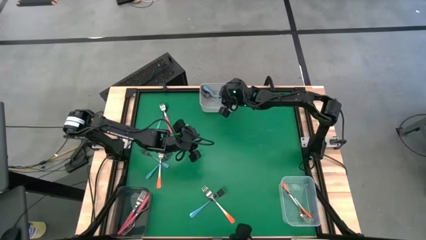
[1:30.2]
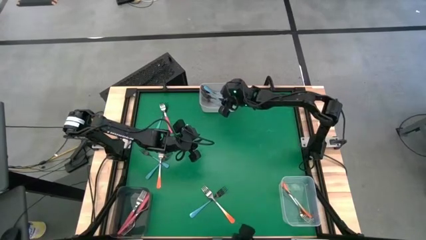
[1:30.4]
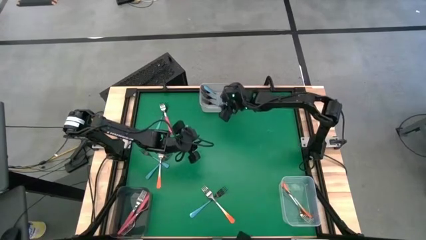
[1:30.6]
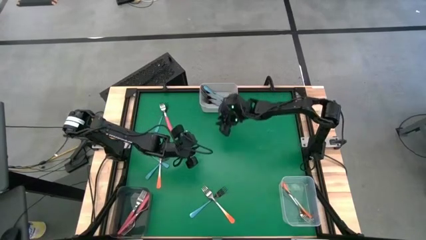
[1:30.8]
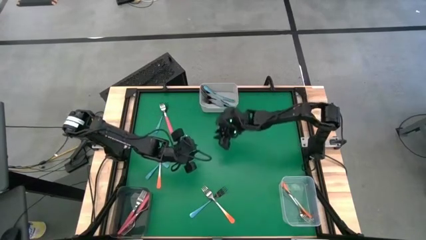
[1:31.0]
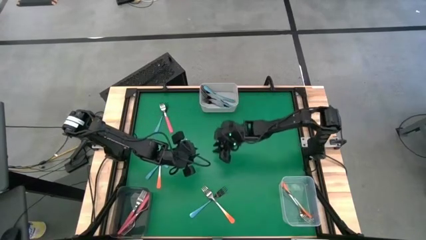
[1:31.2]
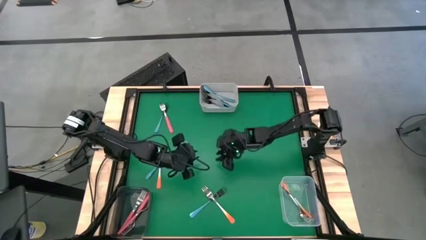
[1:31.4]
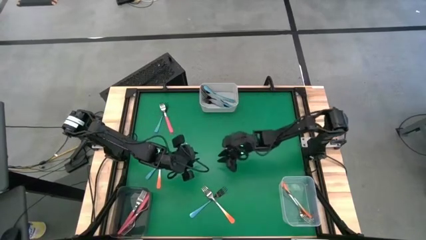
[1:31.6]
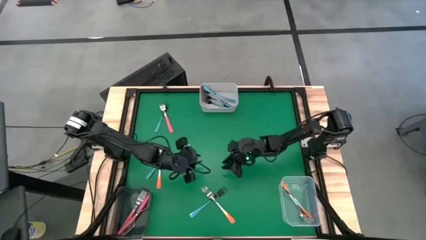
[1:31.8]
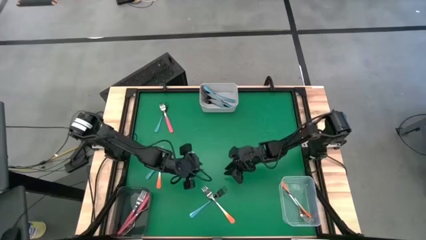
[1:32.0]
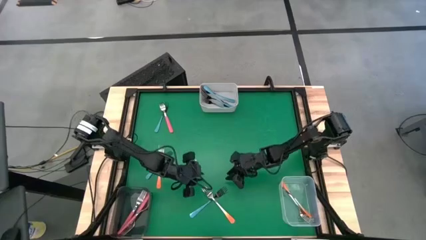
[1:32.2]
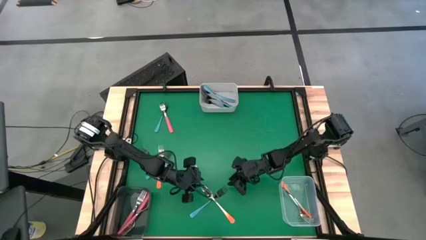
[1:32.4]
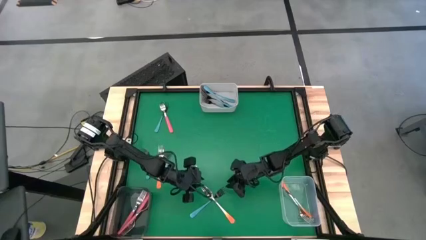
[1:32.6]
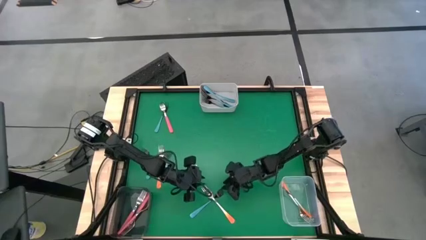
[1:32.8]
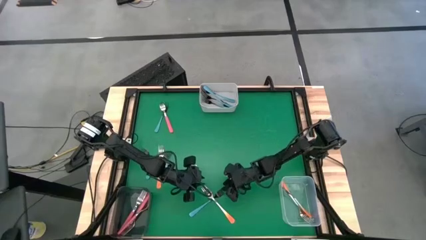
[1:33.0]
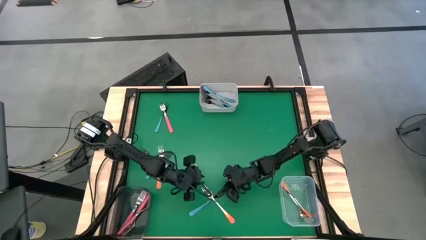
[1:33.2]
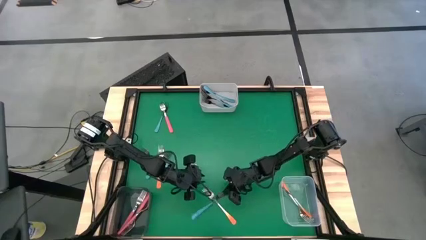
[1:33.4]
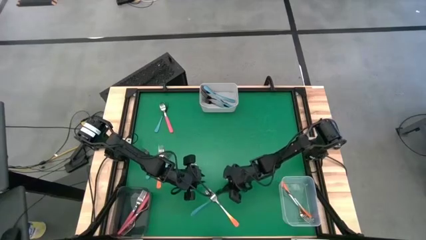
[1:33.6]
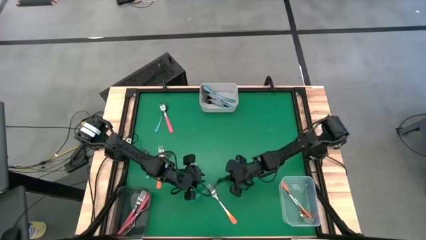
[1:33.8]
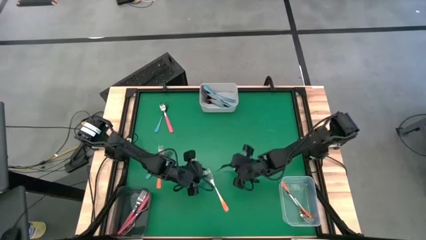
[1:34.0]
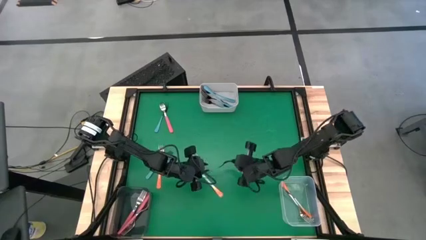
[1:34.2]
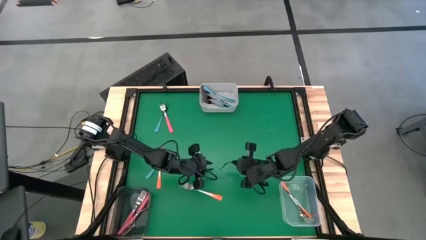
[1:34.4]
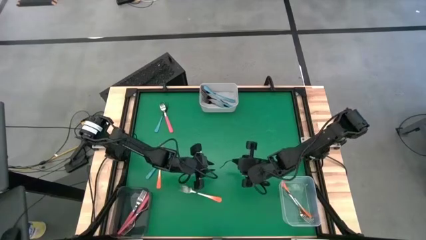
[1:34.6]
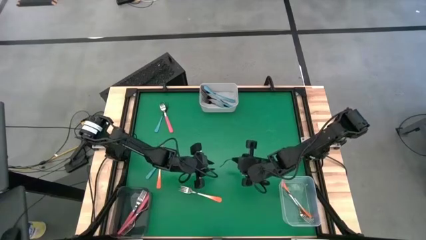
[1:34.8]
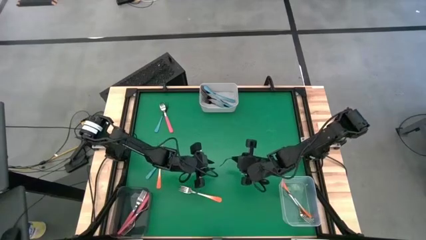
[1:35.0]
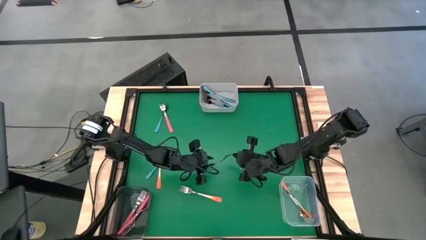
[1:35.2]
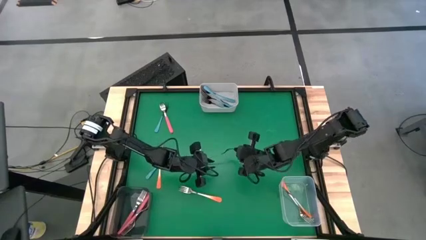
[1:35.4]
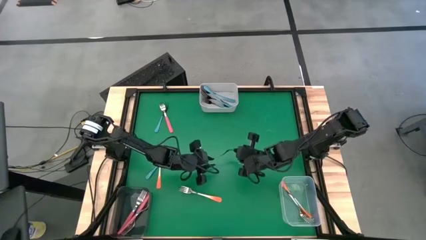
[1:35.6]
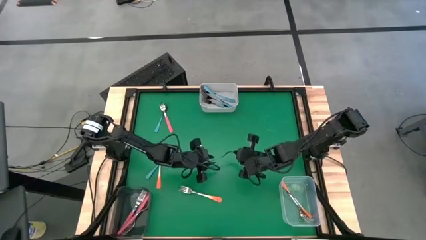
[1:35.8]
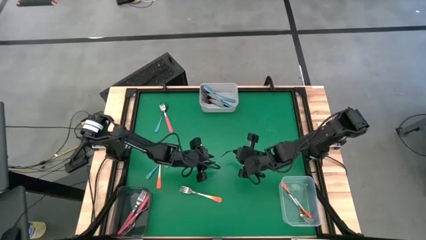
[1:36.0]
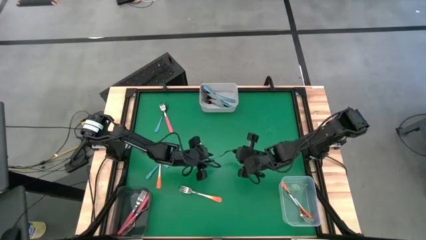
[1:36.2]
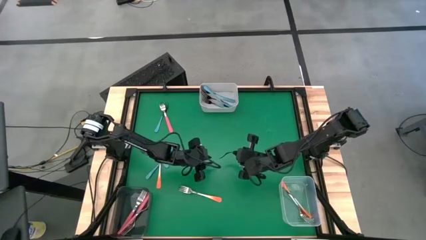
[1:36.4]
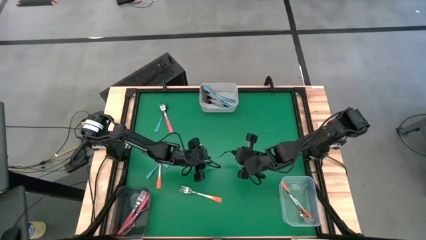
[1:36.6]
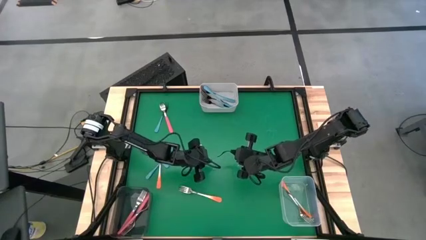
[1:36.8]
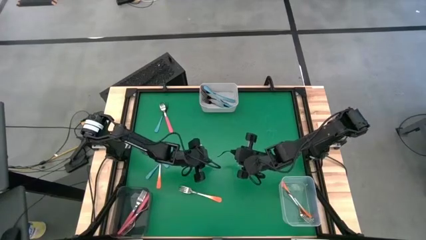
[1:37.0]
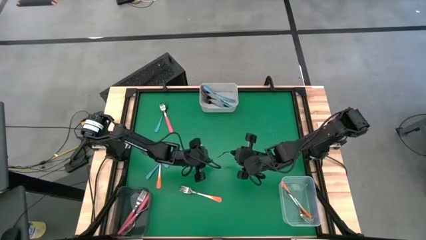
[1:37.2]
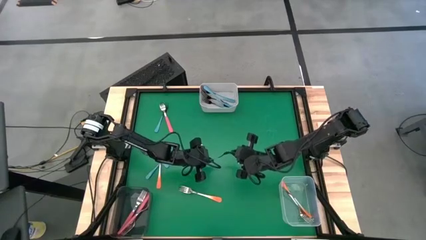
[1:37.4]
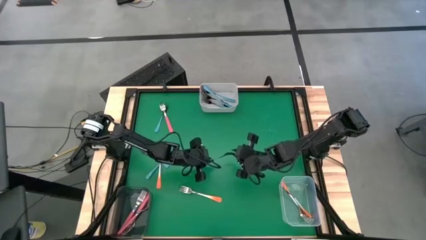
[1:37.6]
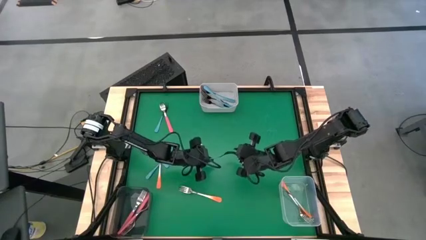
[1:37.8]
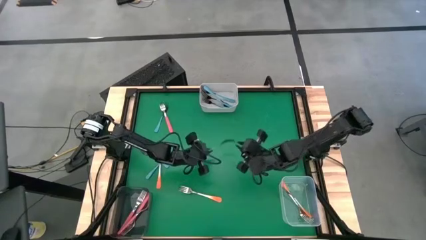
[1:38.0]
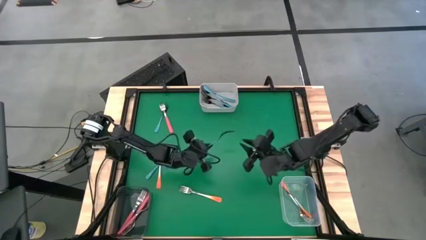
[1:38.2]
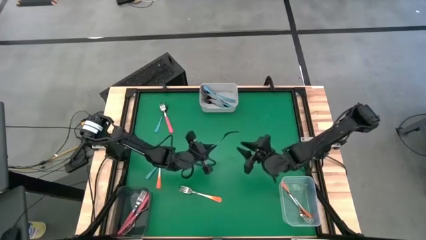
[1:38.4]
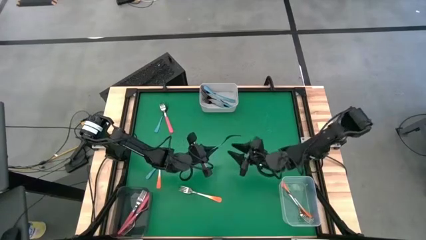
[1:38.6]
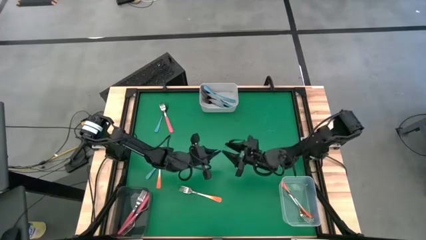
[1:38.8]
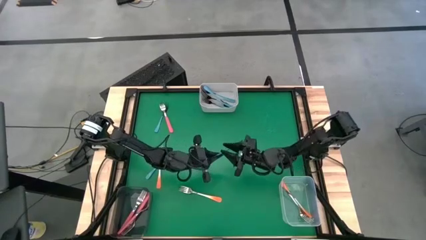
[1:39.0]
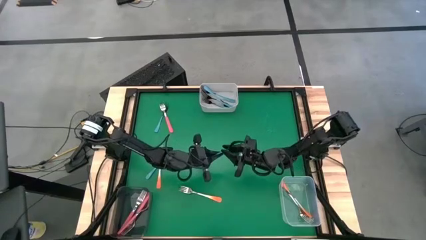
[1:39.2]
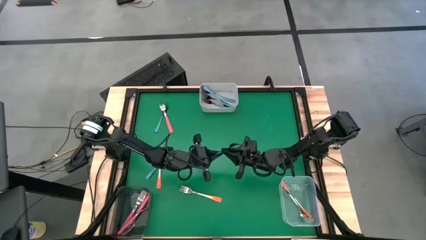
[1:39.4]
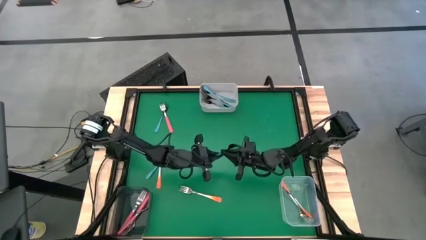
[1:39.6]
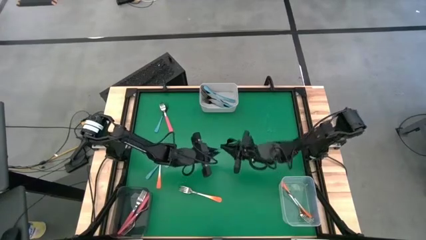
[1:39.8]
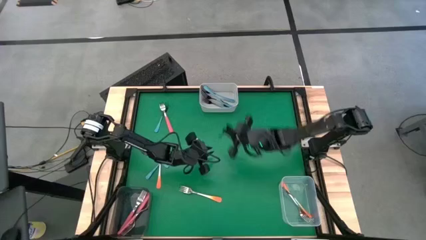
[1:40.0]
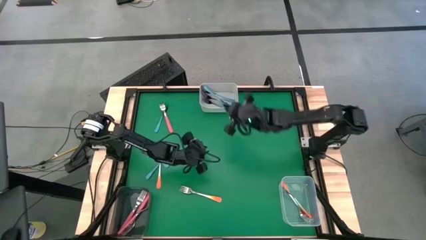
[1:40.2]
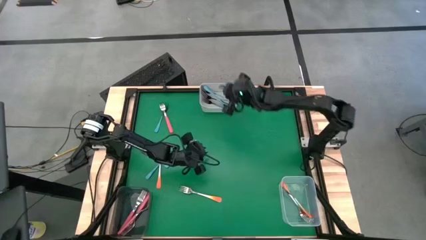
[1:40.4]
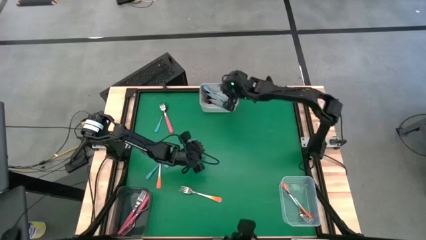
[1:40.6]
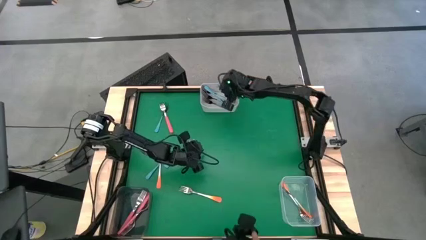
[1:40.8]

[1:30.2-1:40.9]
Task: Sort silverware by color (type)
Put the blue fork into the white bin

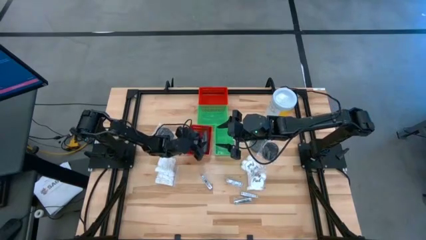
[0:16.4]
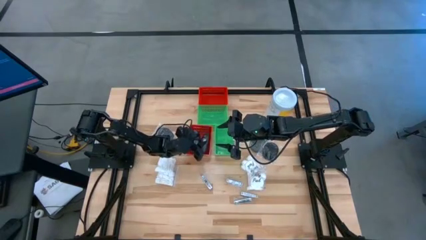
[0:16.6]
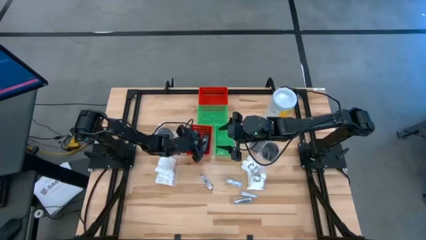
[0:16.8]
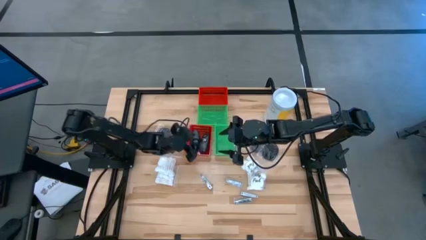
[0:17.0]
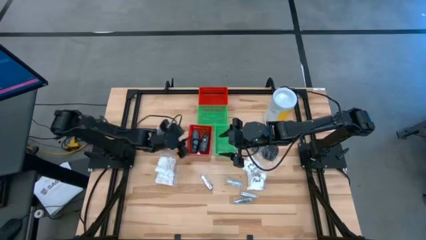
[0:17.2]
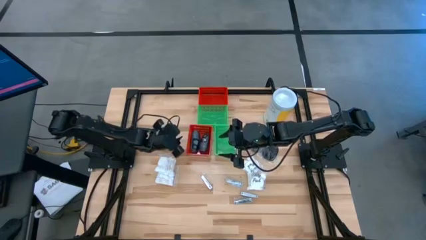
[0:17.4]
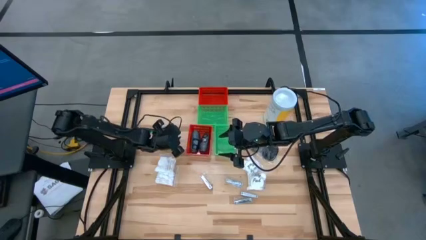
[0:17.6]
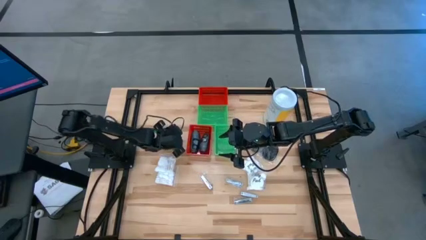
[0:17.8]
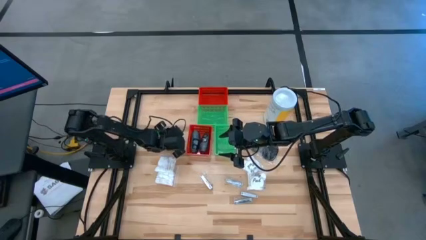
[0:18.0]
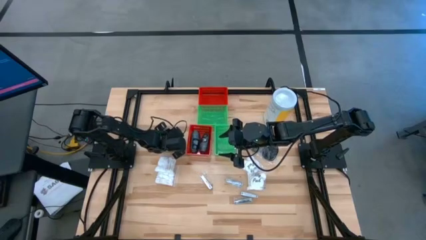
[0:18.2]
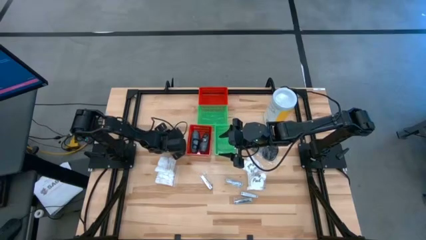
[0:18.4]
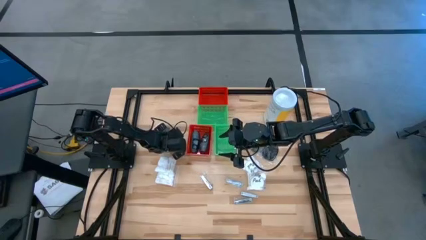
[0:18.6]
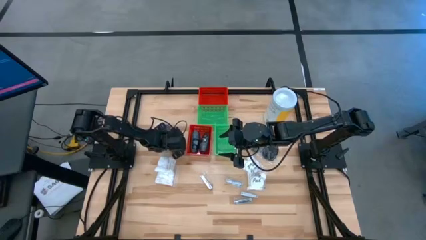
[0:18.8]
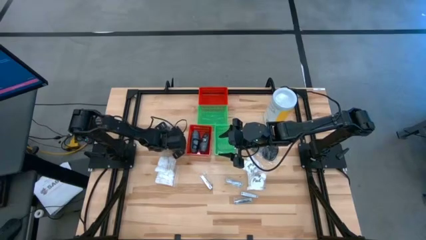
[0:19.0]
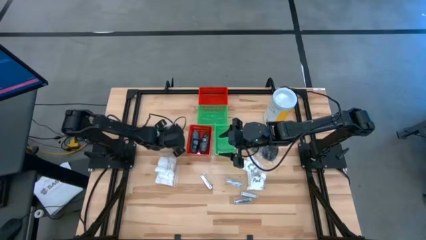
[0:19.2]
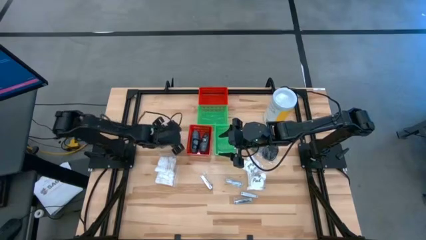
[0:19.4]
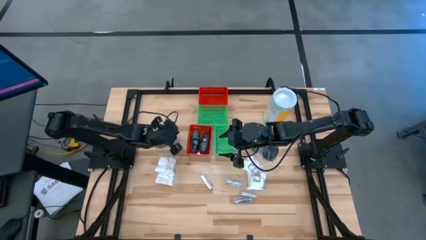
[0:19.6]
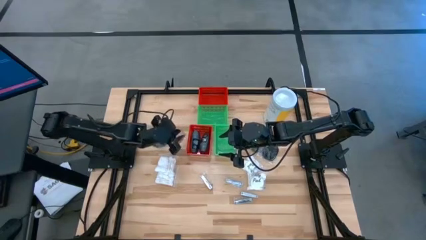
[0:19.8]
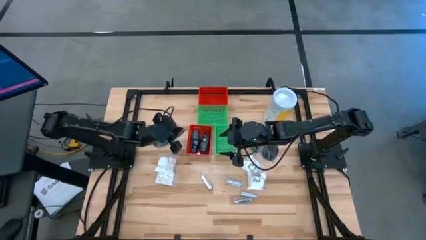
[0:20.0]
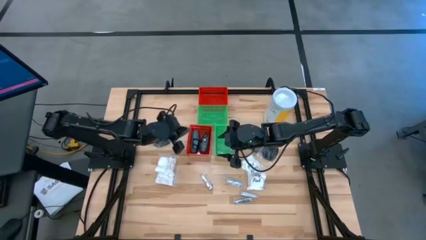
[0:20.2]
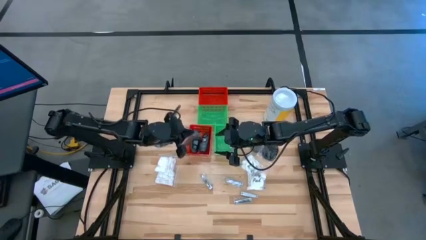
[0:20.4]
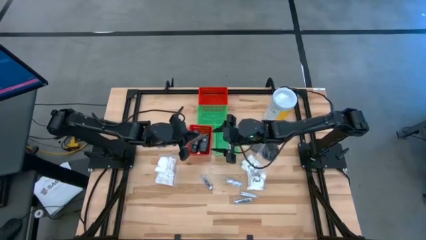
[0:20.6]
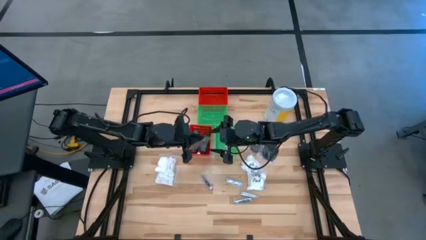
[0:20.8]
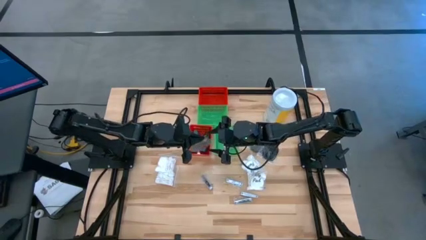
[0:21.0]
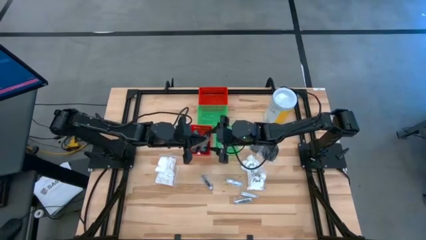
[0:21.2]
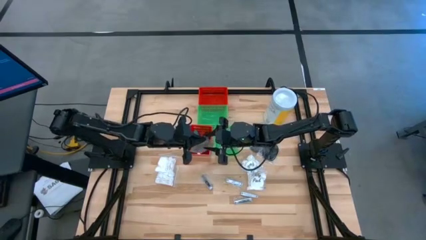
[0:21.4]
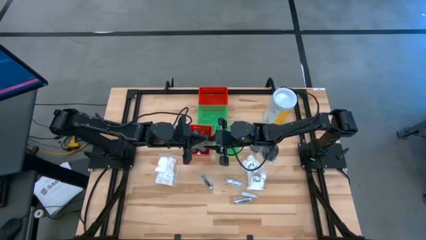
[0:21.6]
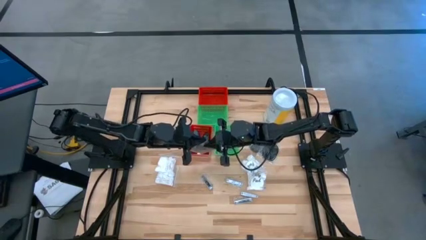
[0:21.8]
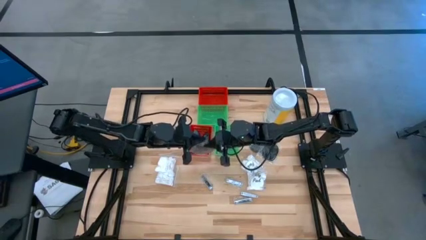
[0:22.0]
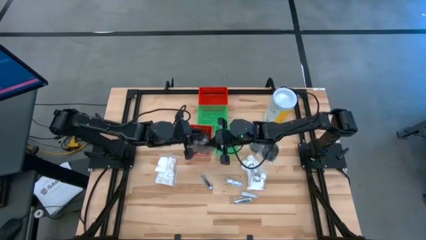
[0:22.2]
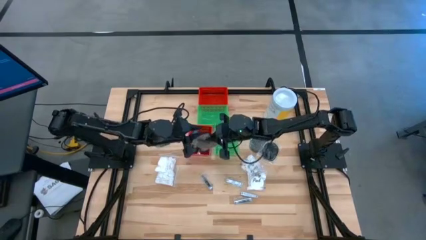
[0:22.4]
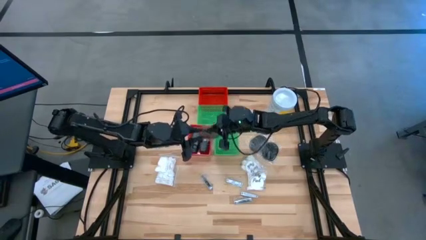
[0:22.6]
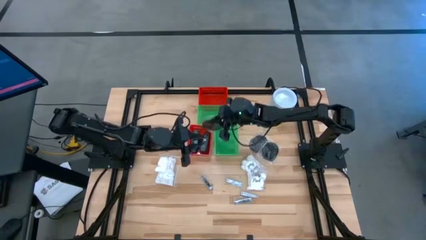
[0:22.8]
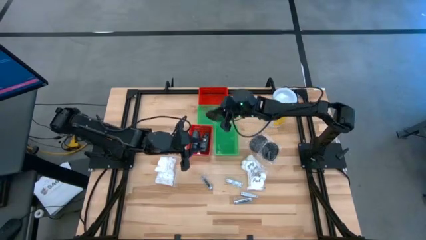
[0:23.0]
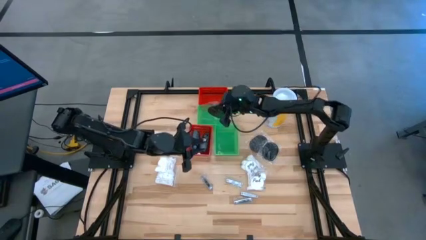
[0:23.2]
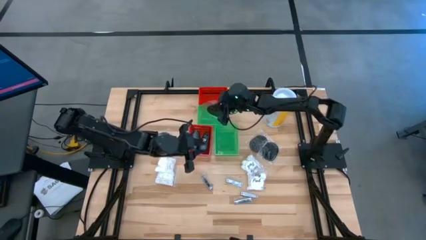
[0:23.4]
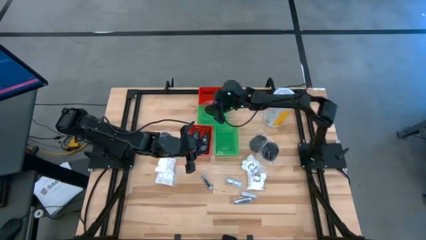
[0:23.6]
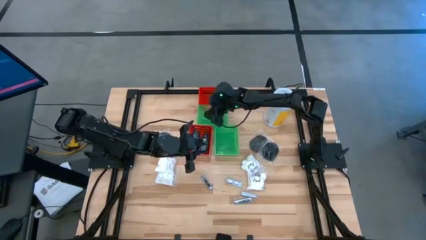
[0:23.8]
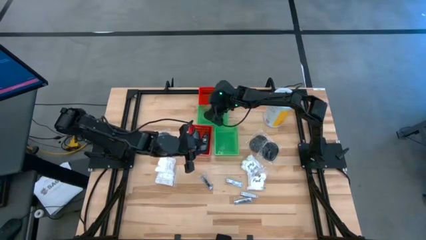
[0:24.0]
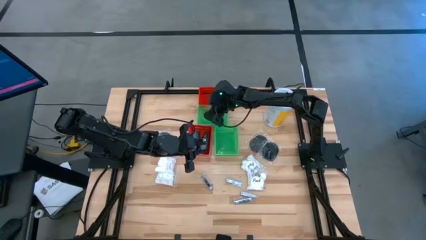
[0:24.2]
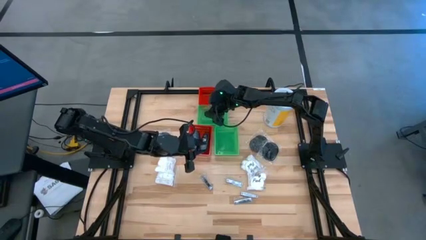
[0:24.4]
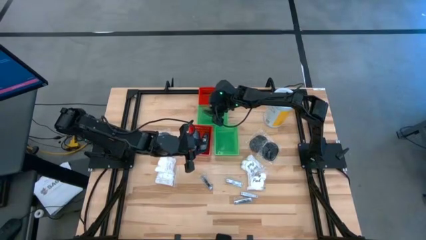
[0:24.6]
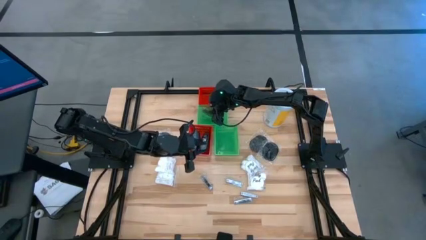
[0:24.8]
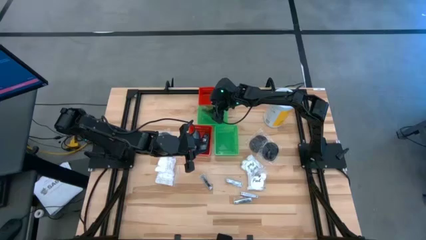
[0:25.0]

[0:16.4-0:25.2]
Task: Pick & Place Travel size toiletries
Put the black hairbrush into the top green bin
